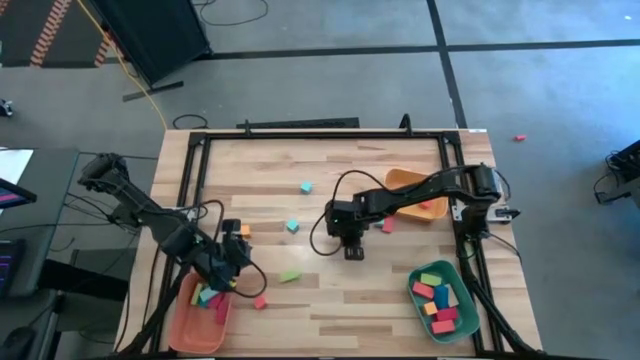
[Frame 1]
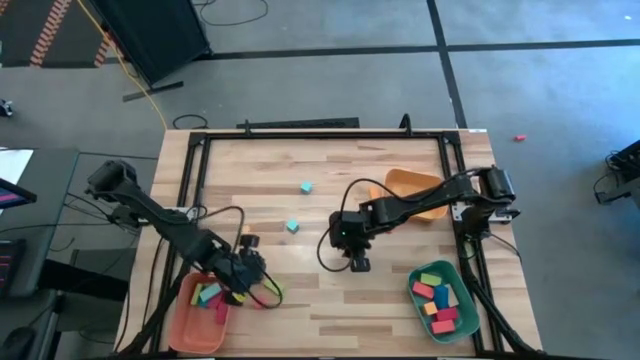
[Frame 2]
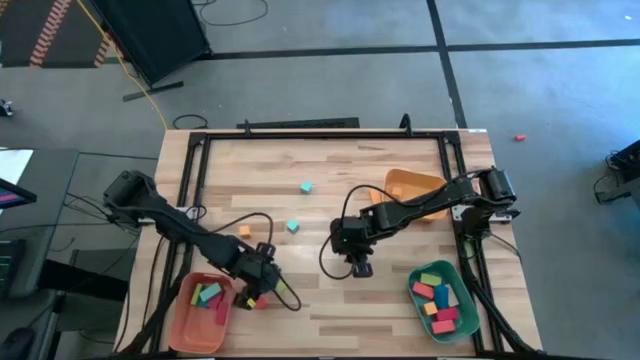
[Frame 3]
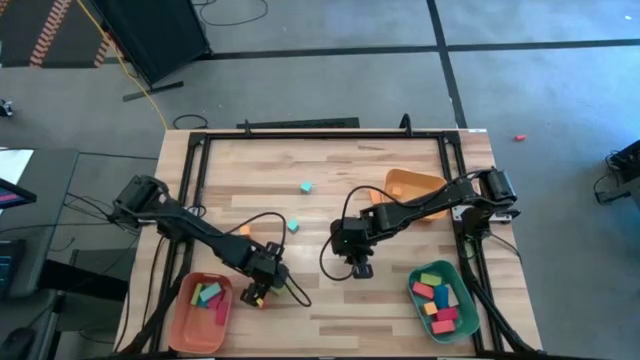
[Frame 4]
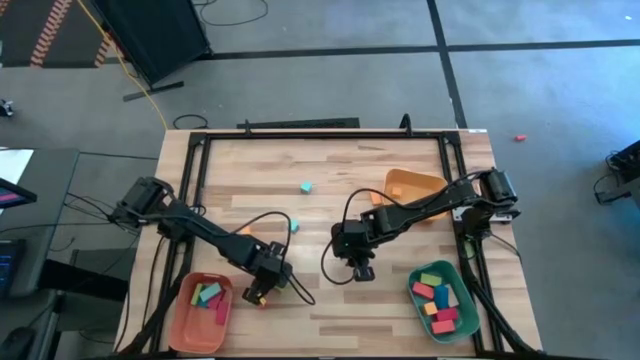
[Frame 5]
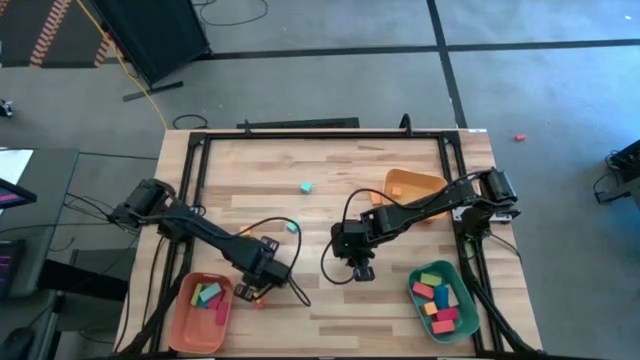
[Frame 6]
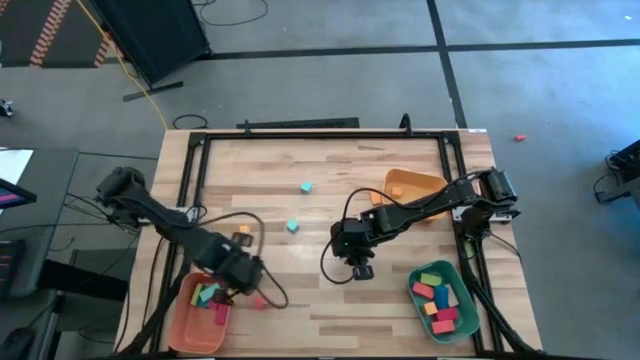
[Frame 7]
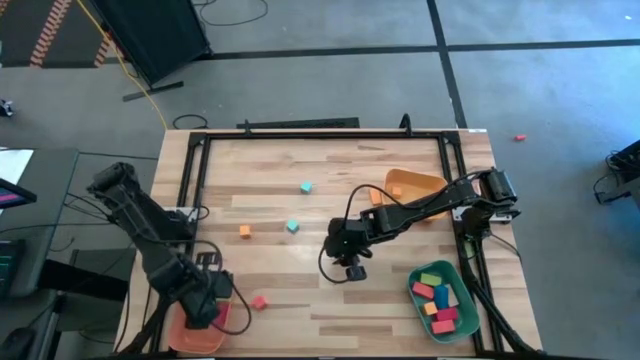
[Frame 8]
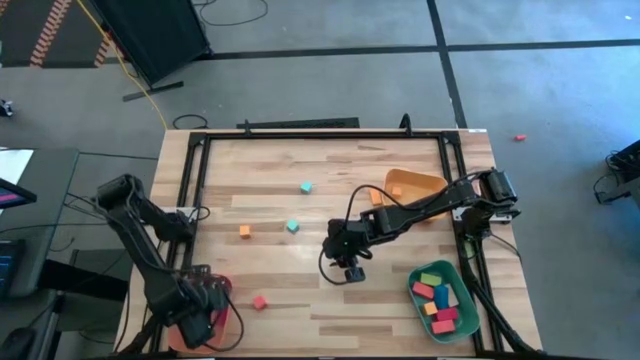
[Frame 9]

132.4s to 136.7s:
Task: Sort blocks by size
Put the medium green block into the orange bin

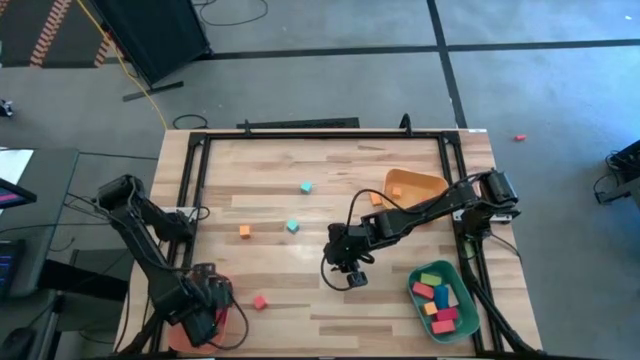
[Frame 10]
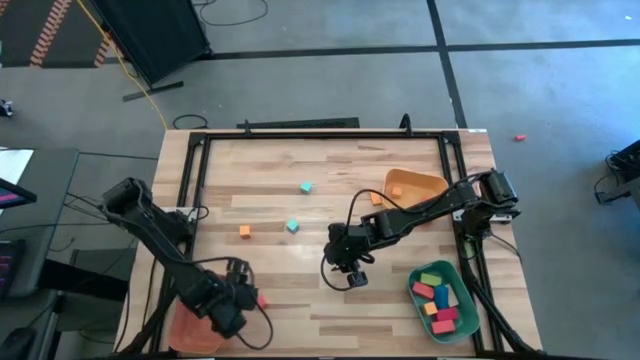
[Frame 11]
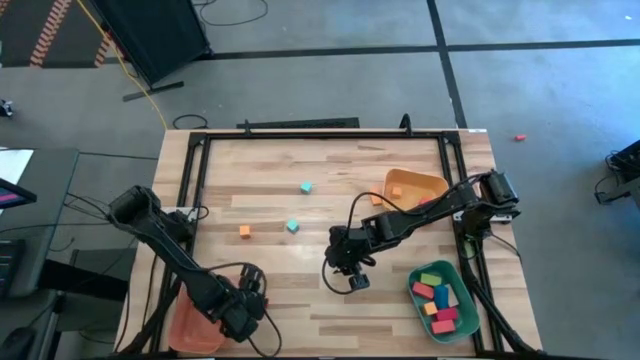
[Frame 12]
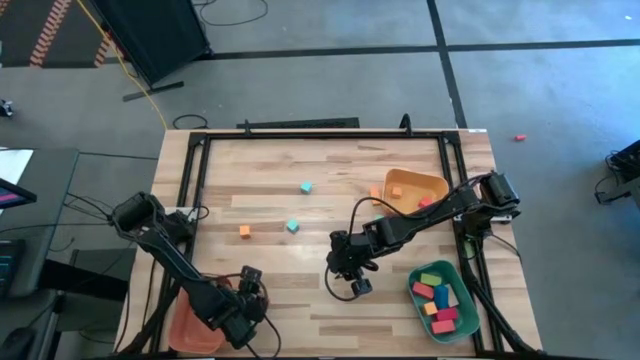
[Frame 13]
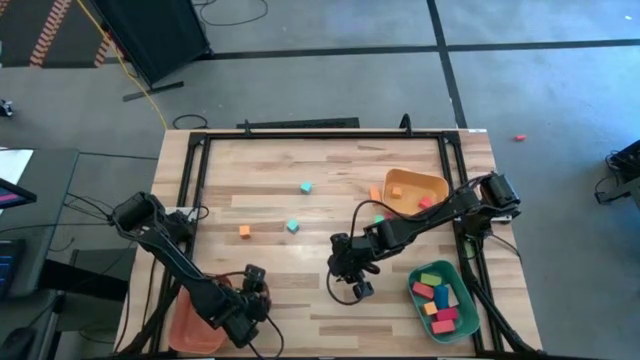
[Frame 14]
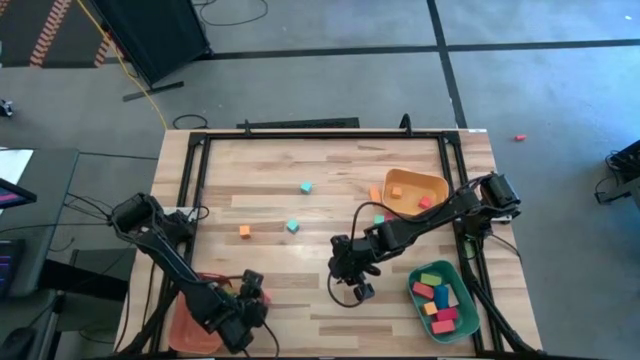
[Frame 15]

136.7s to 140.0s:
Put the small orange block into the yellow bin

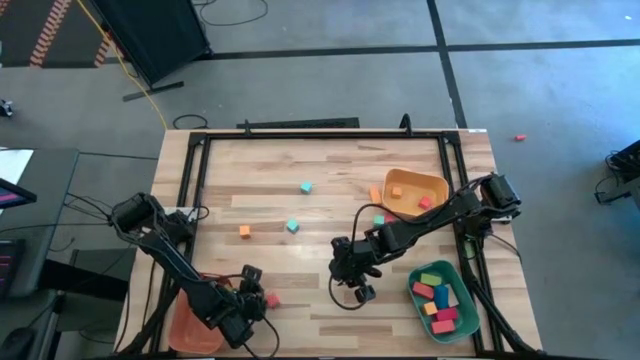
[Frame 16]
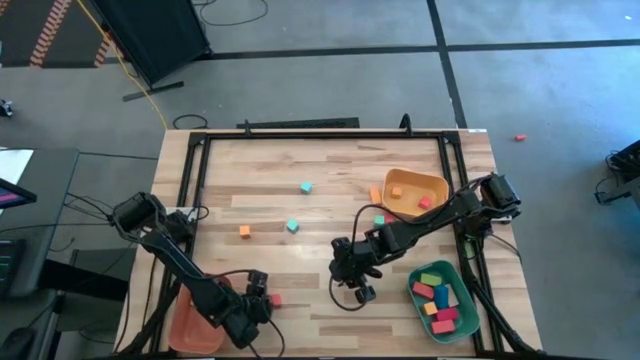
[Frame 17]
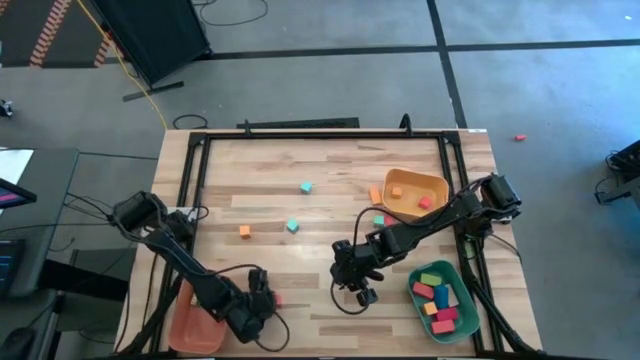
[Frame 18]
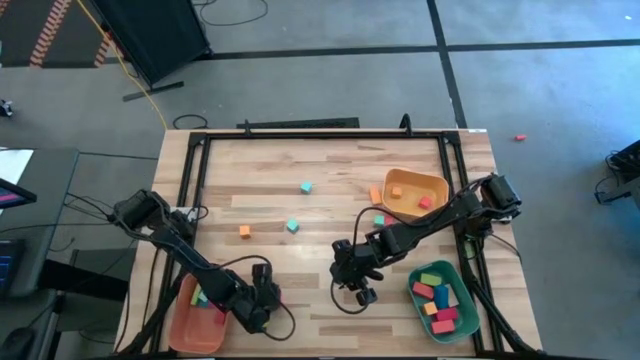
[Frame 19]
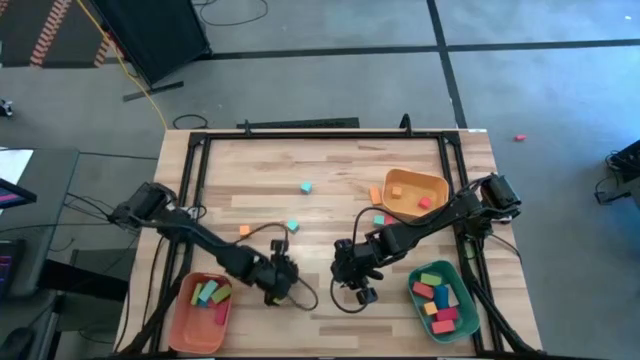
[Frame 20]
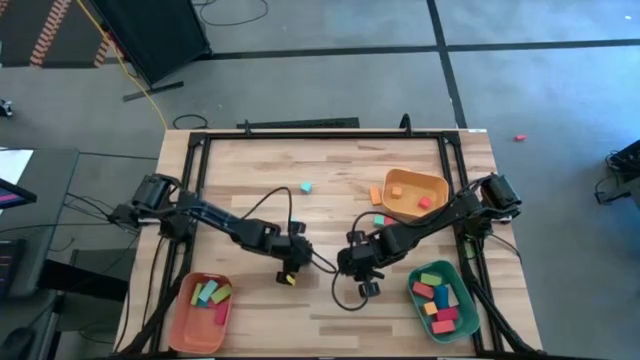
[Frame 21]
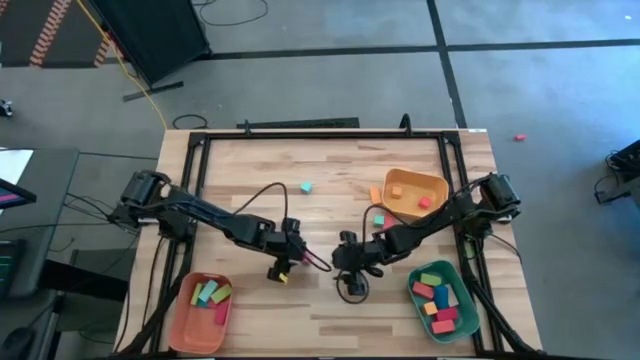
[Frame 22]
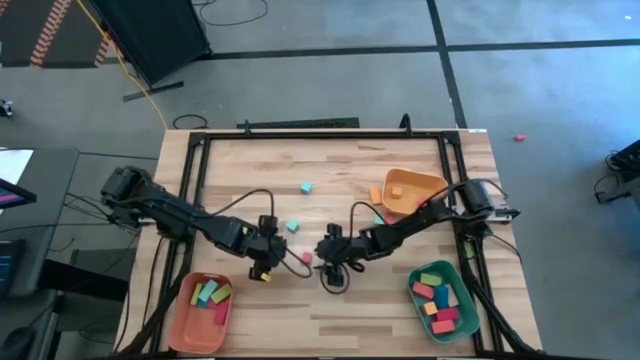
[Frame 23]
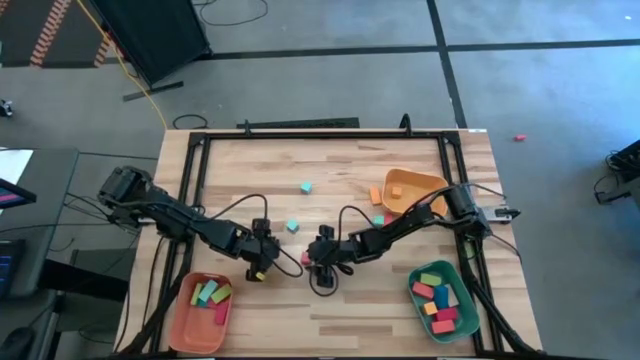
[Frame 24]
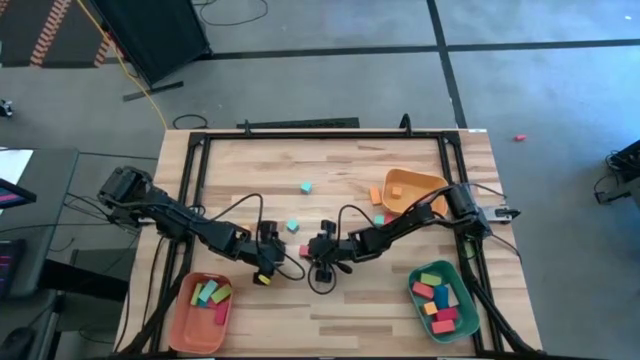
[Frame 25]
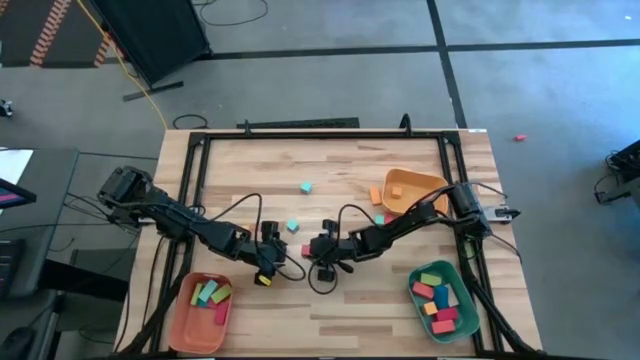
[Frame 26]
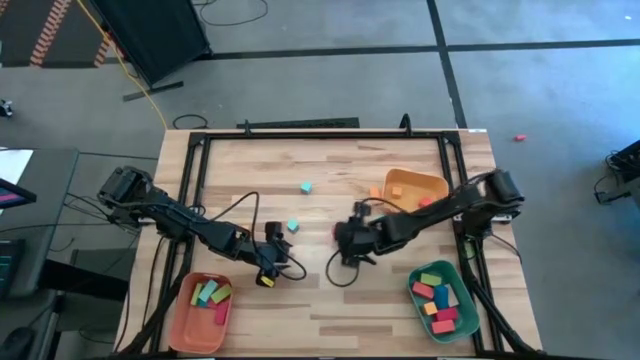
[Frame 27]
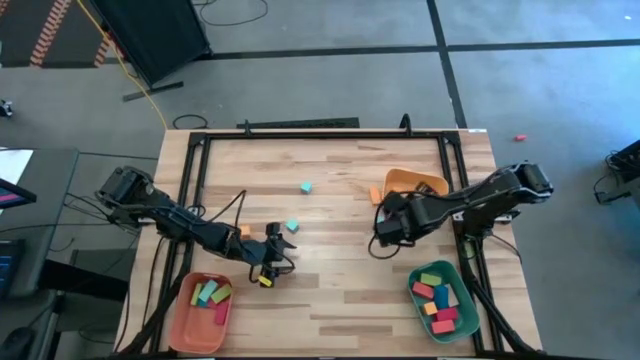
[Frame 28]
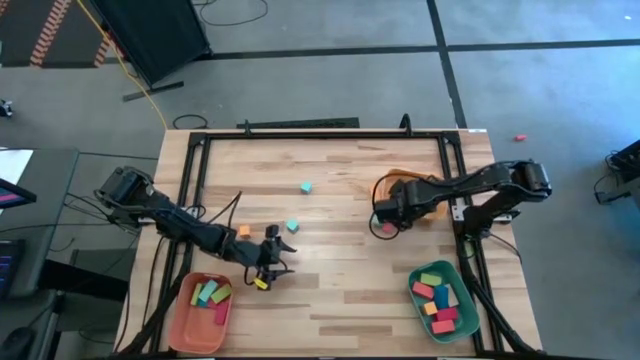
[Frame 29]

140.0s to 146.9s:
Put the small orange block into the yellow bin

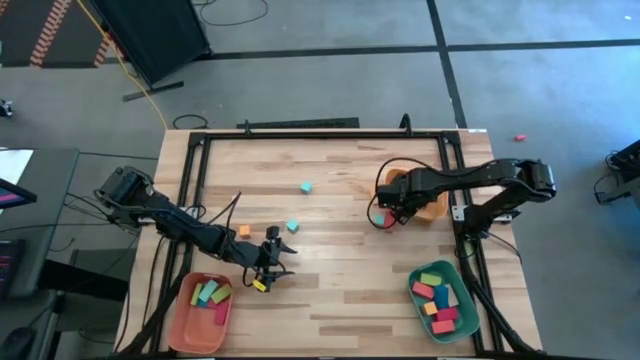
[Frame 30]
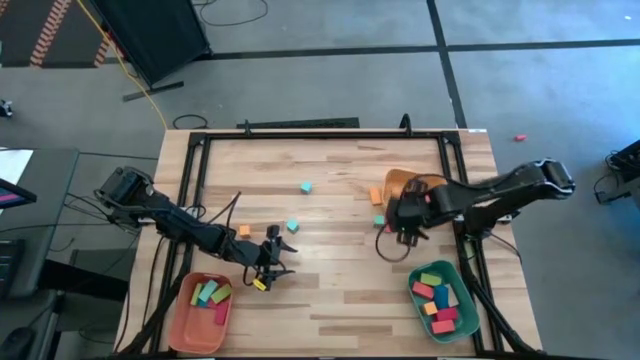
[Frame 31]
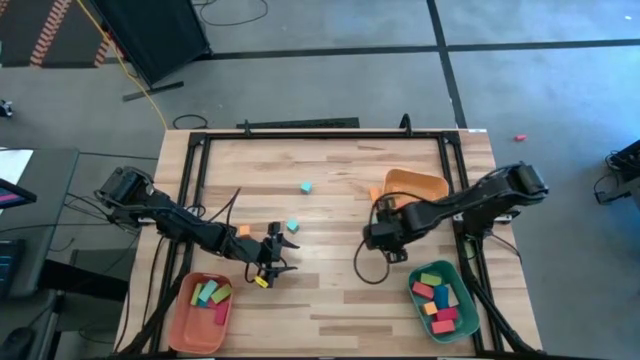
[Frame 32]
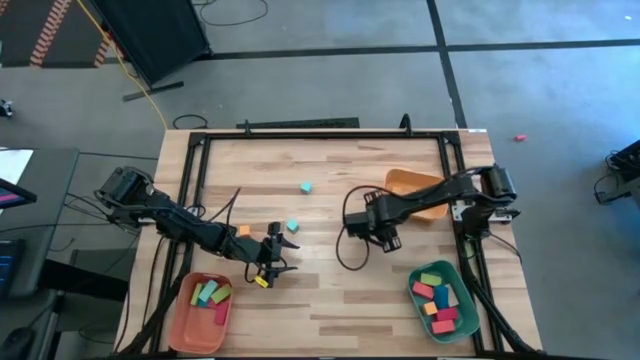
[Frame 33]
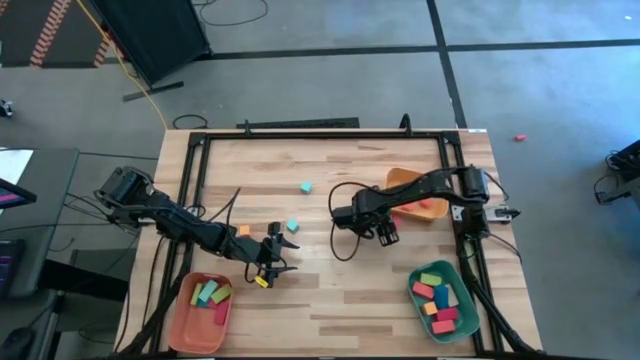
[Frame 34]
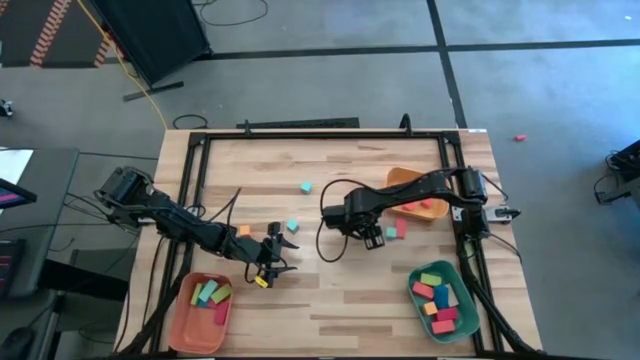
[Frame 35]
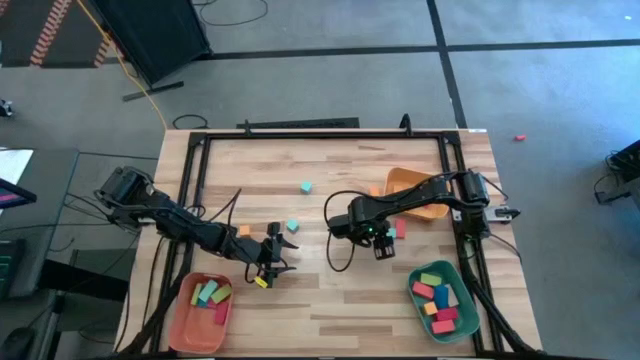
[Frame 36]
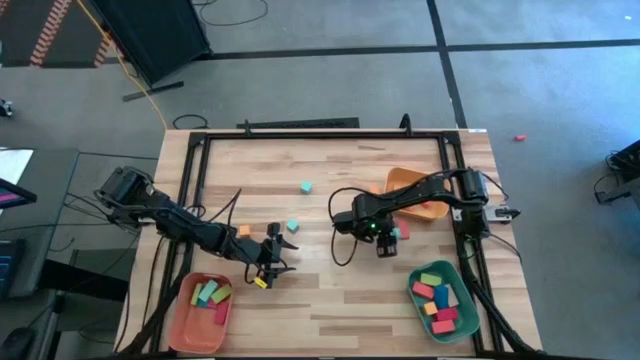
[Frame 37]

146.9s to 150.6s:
Put the small light blue block into the yellow bin

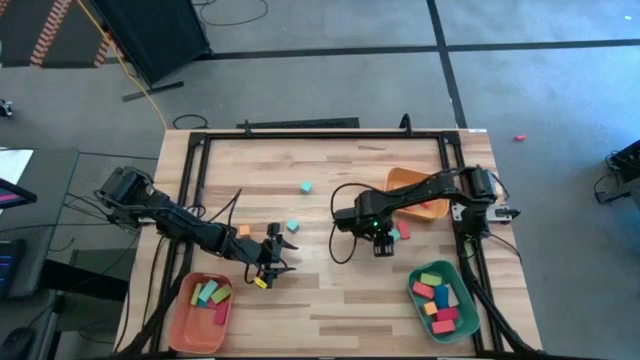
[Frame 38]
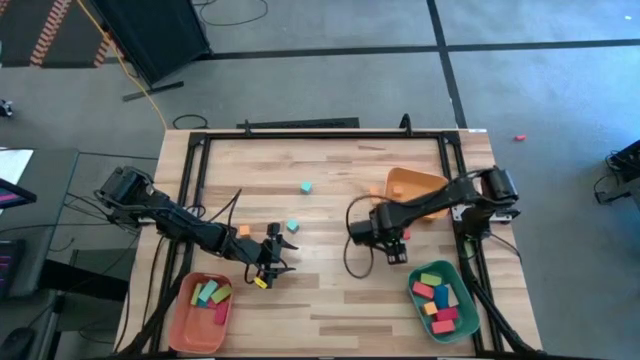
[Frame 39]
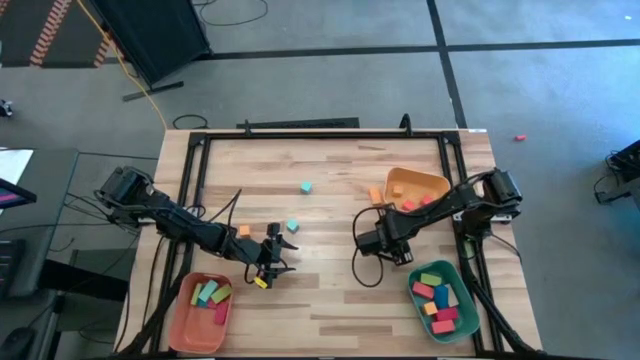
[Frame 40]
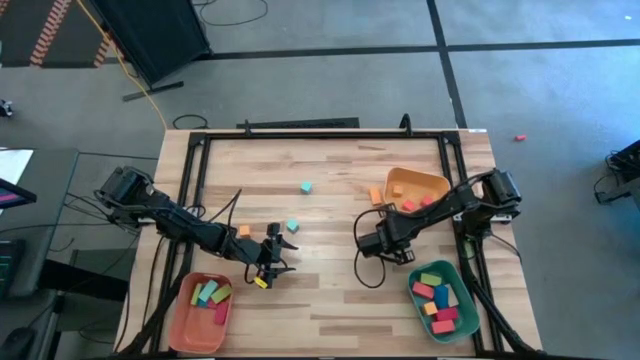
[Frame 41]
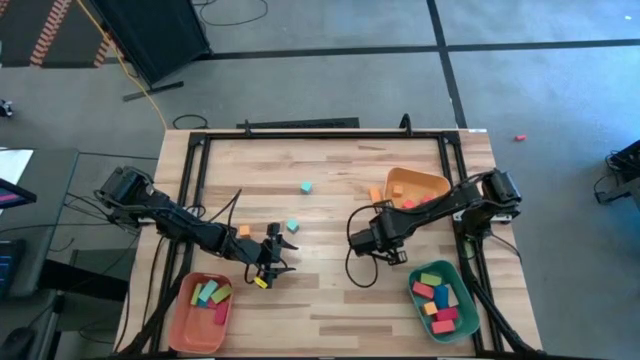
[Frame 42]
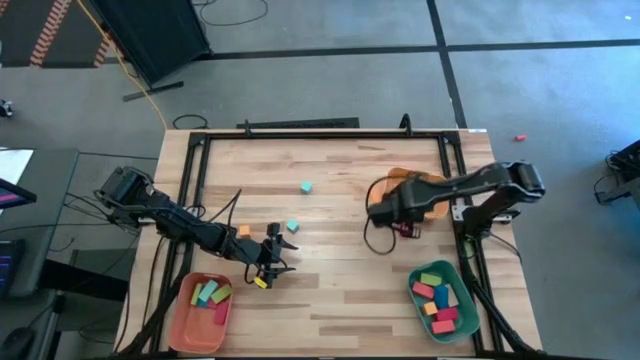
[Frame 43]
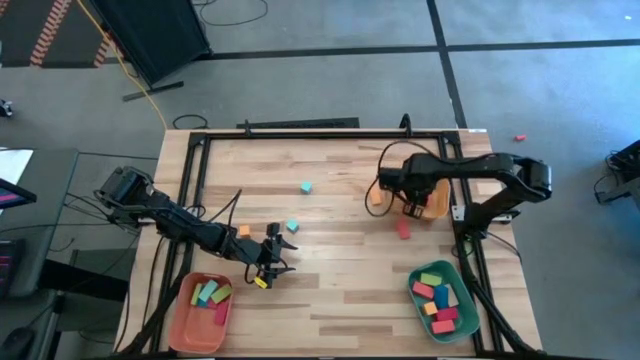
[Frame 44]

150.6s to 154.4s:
Put the small light blue block into the yellow bin
